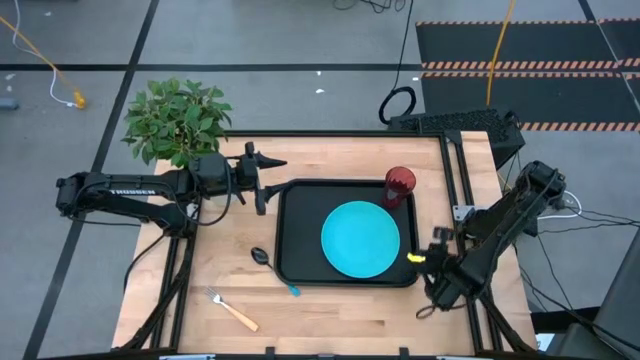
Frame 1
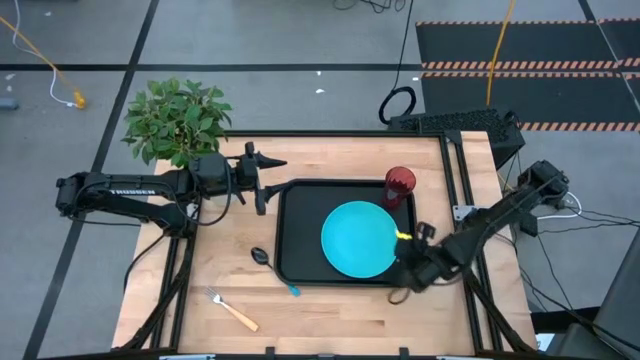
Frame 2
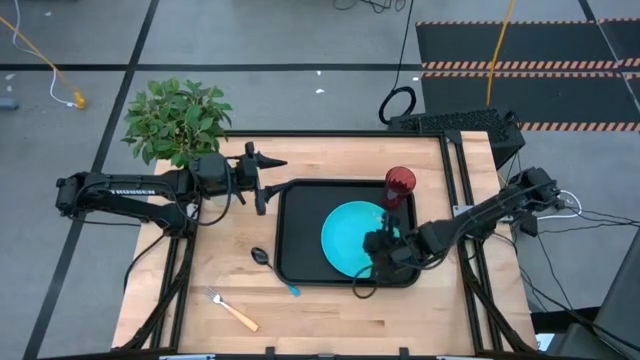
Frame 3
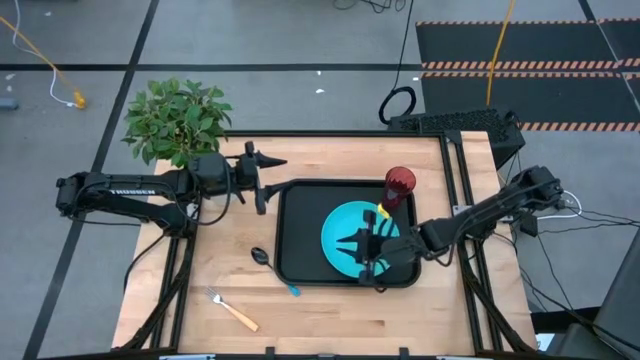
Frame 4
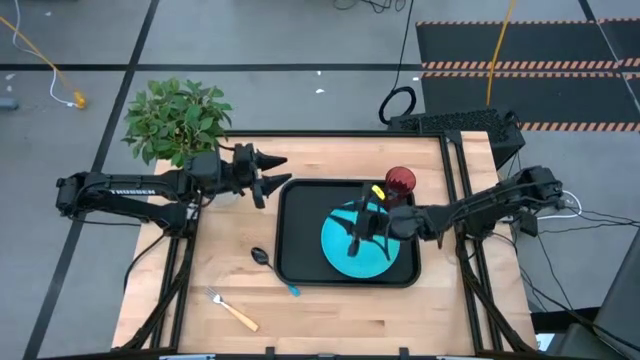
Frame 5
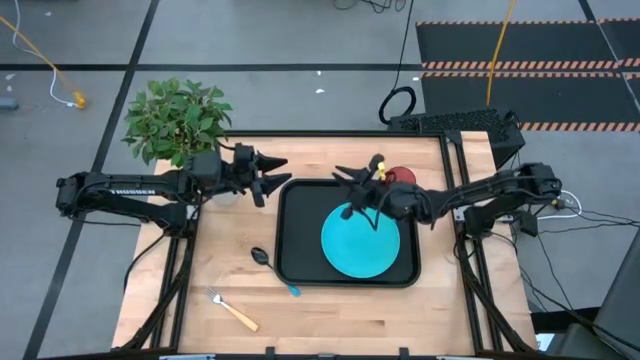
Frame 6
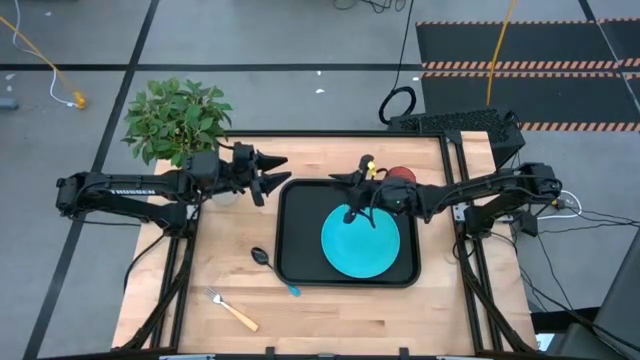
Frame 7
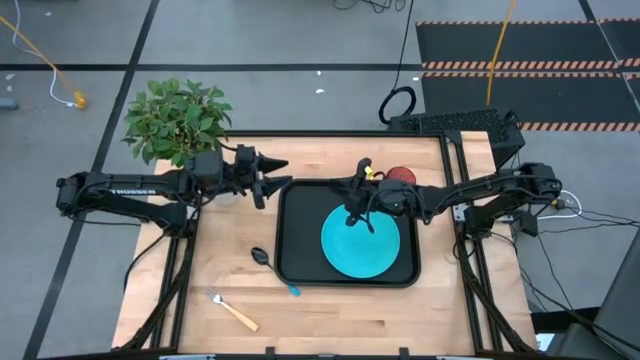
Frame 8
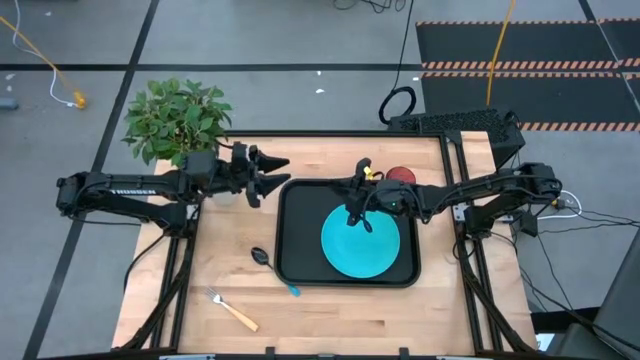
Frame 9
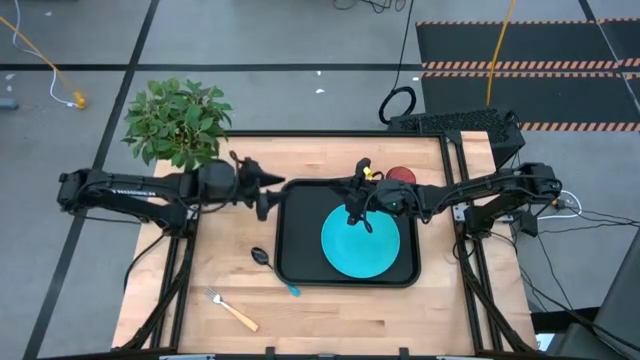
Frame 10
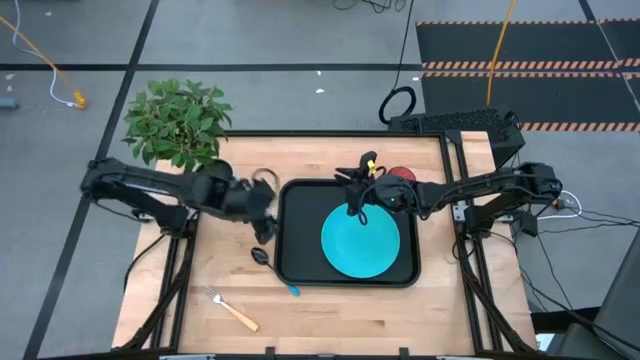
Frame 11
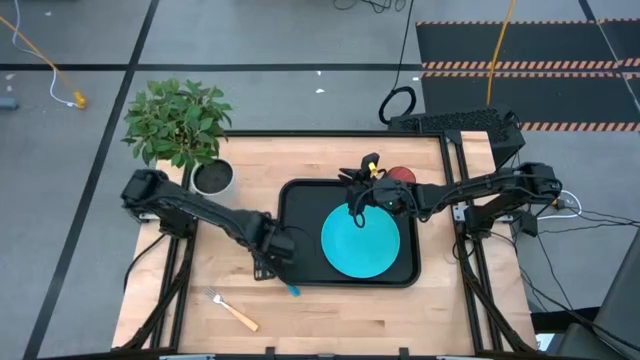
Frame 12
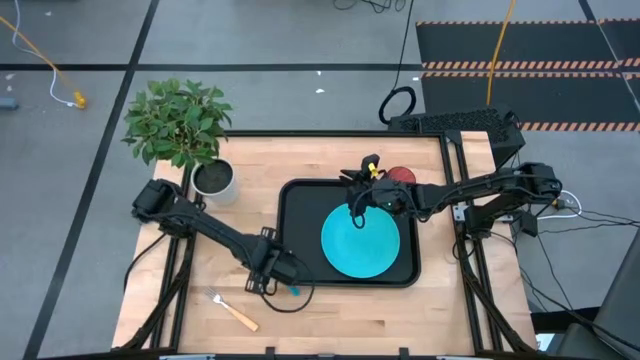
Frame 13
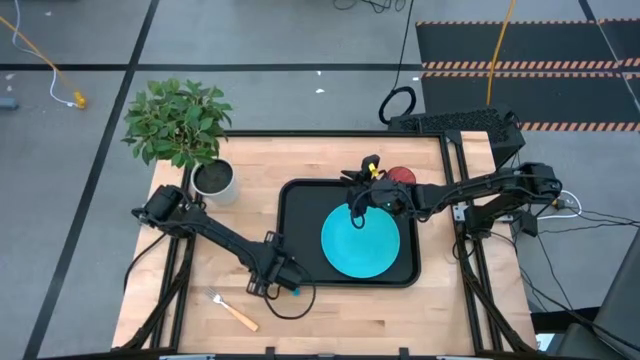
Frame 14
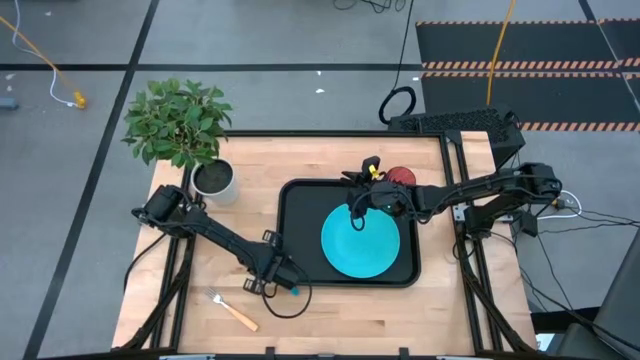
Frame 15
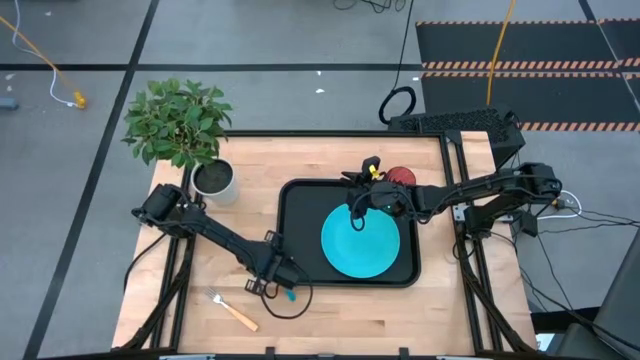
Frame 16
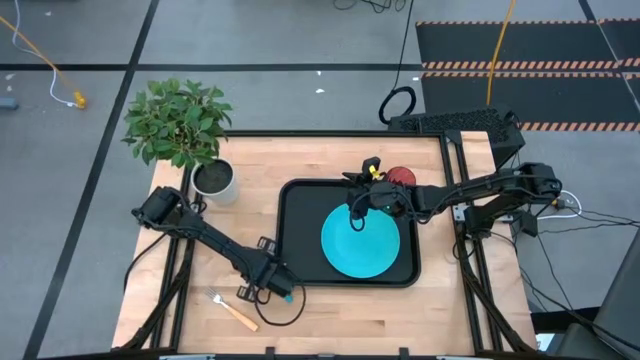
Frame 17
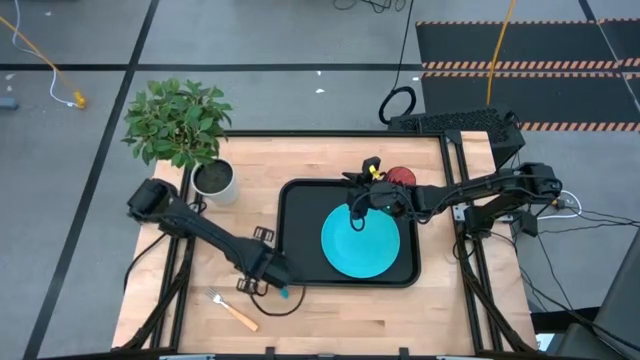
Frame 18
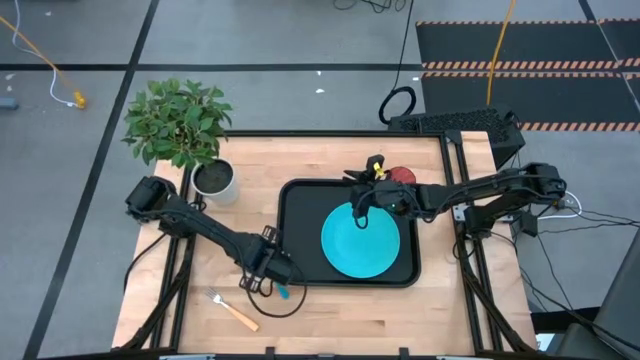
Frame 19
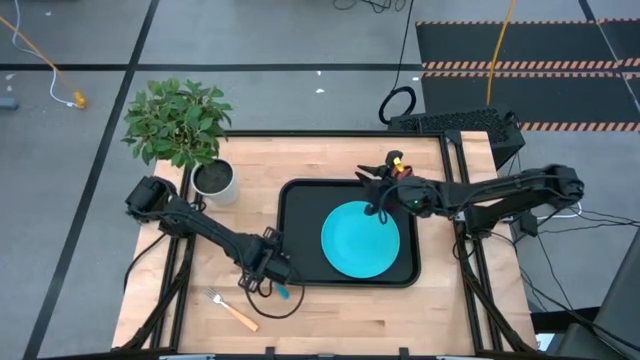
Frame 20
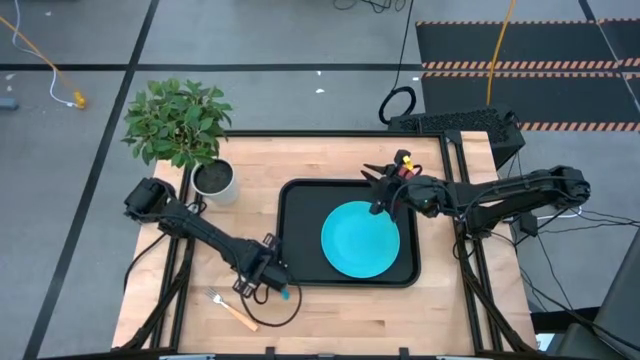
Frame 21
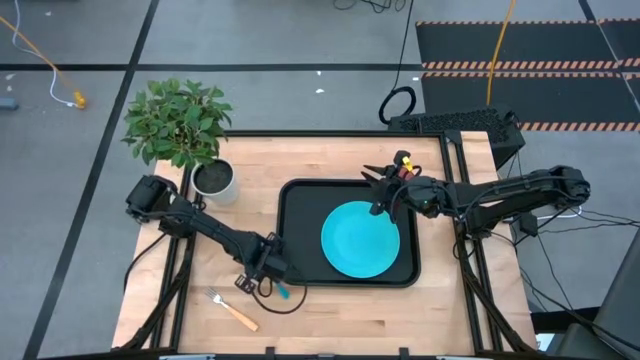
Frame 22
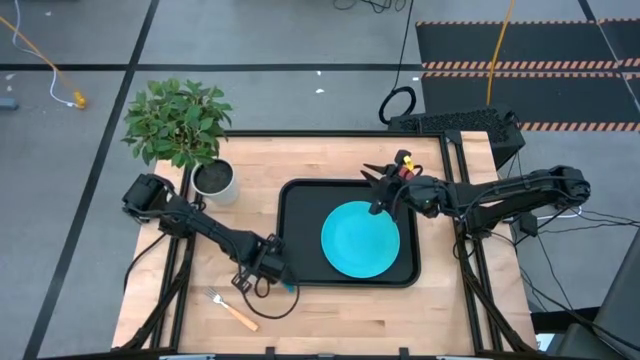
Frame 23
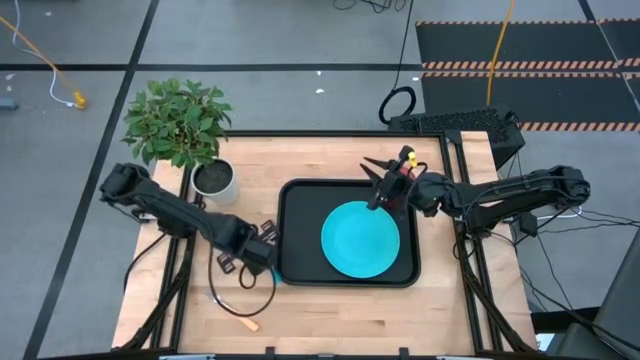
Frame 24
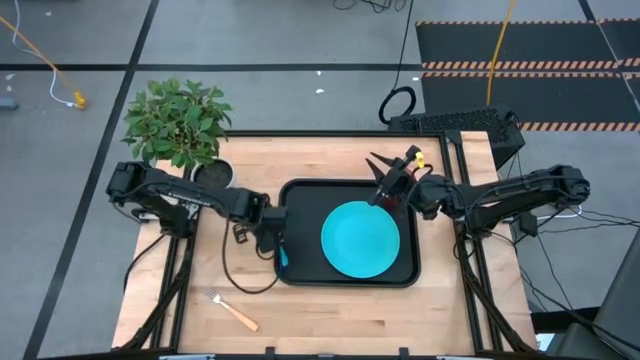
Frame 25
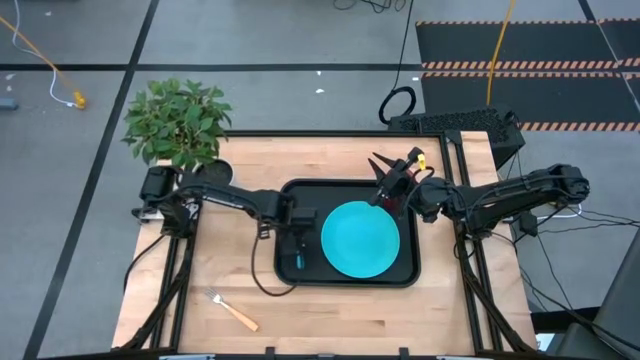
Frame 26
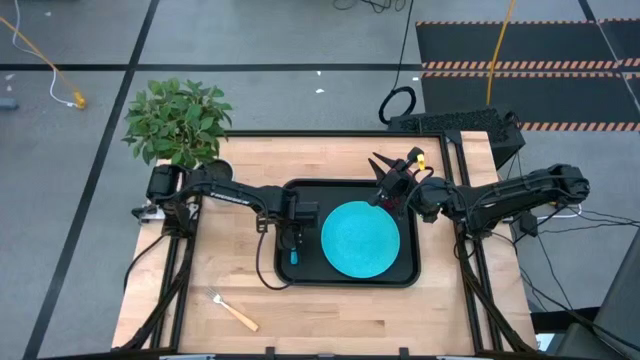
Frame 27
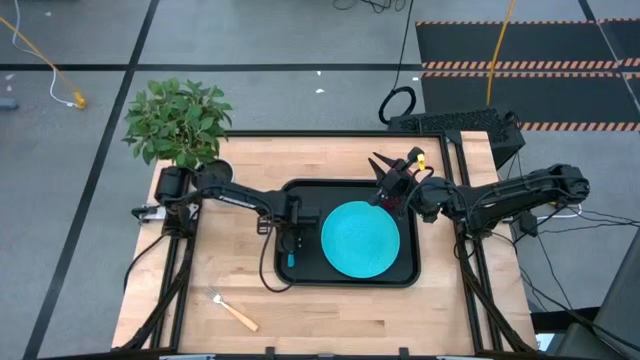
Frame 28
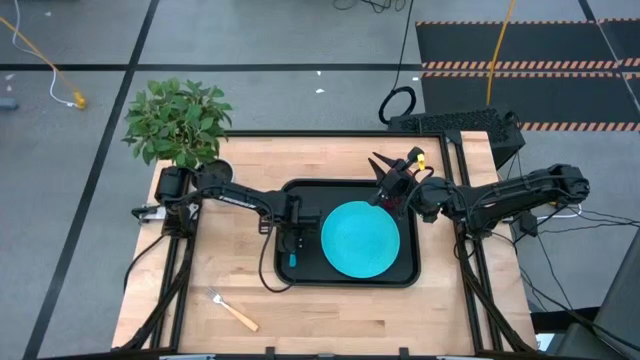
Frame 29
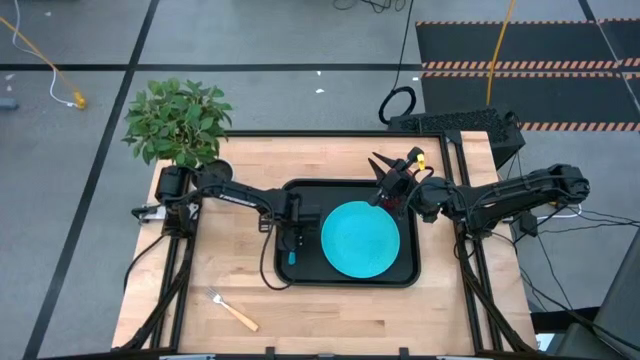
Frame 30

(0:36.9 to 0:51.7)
Task: Pick and place plate/cup/fork/spoon on tray
Put the blue spoon on the black serving tray to the left of the blue plate

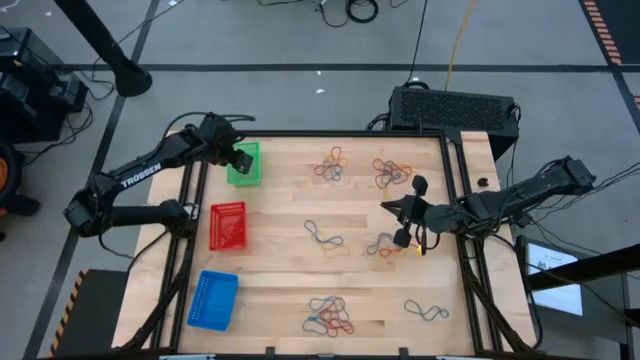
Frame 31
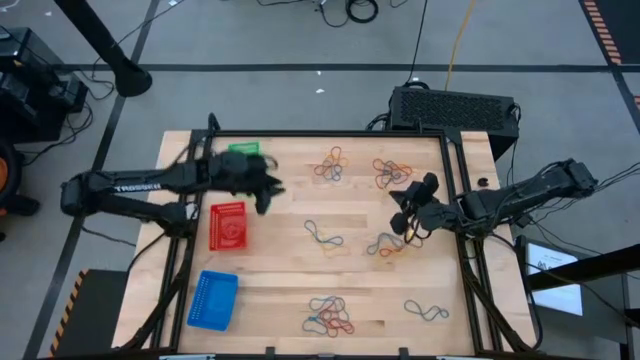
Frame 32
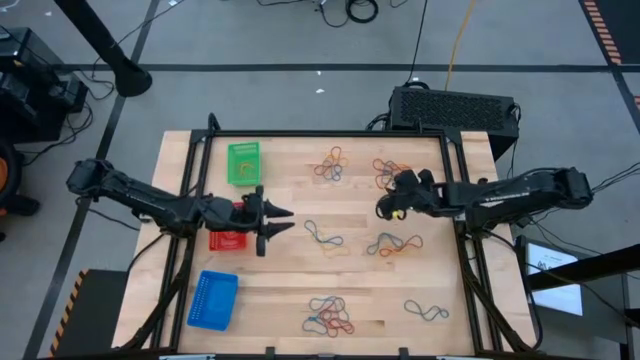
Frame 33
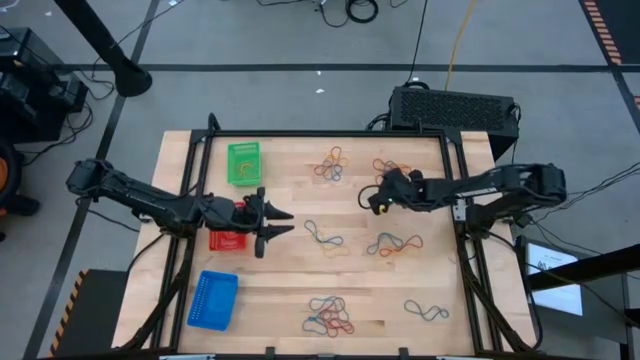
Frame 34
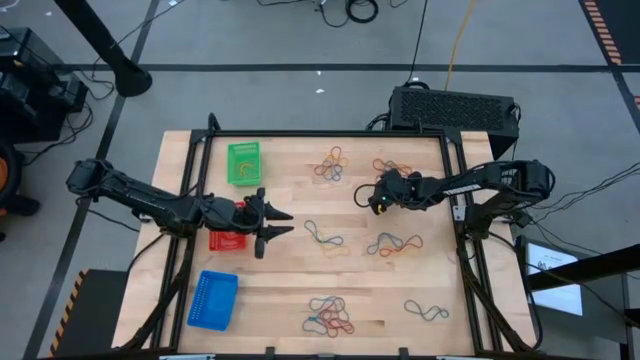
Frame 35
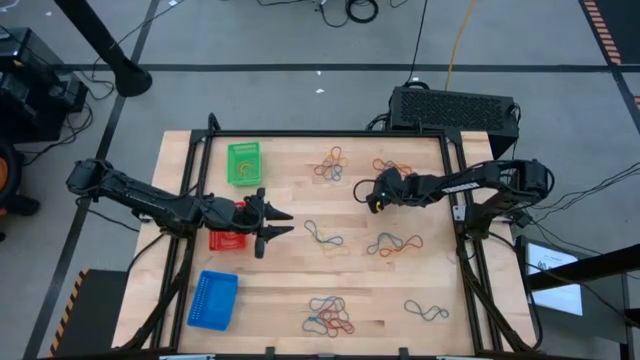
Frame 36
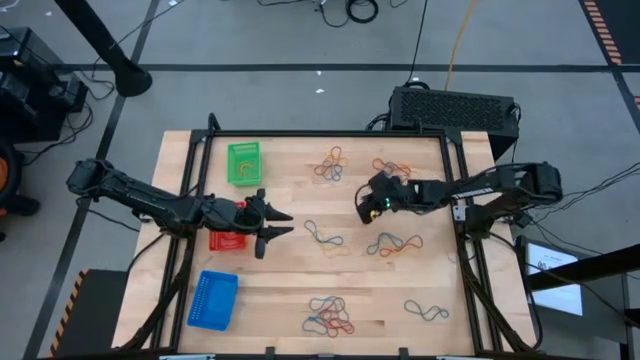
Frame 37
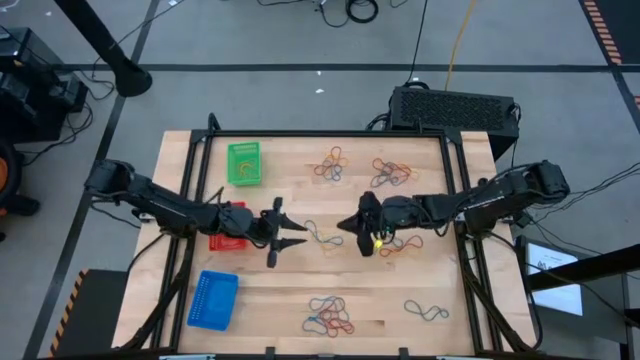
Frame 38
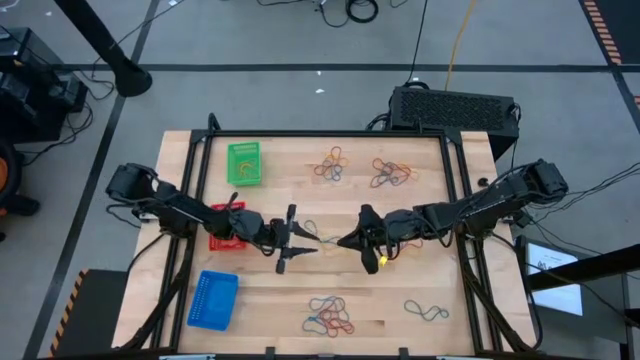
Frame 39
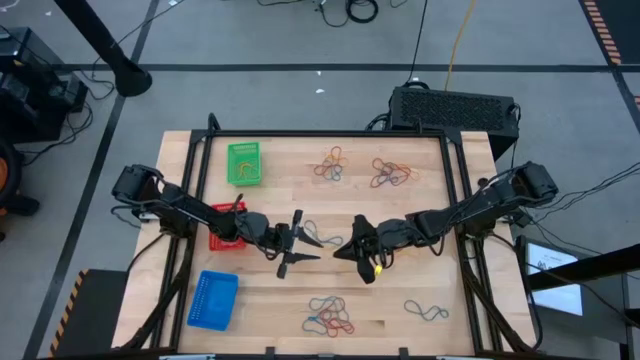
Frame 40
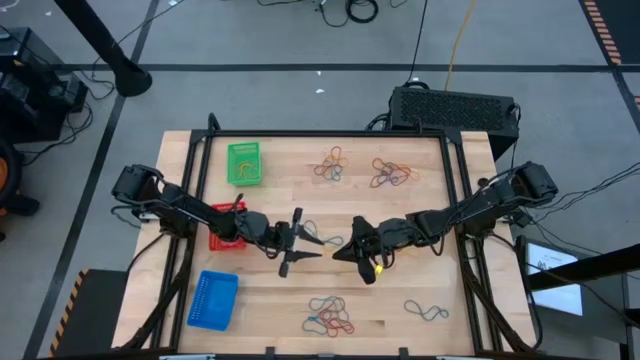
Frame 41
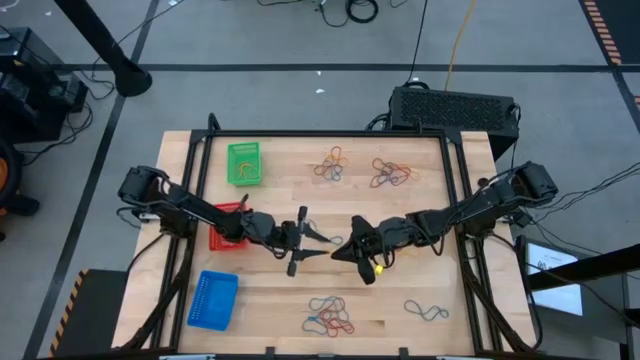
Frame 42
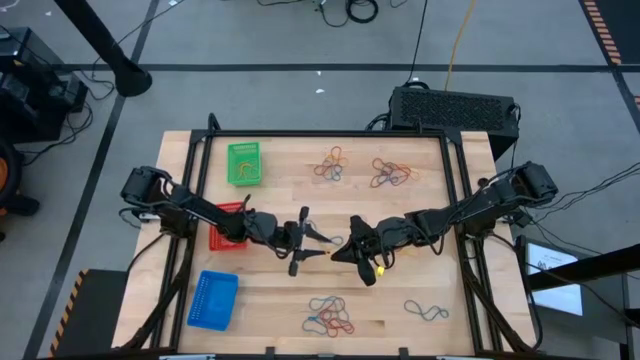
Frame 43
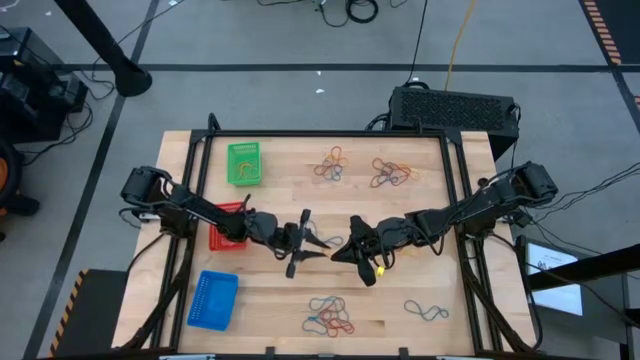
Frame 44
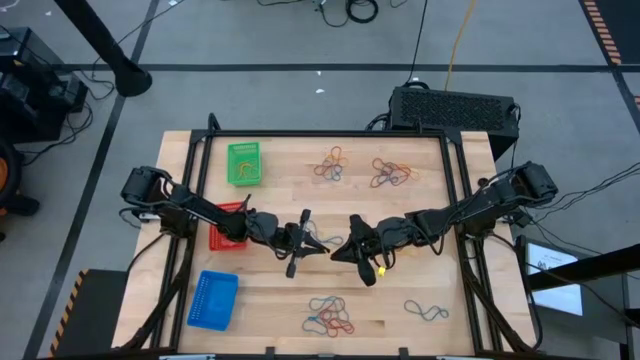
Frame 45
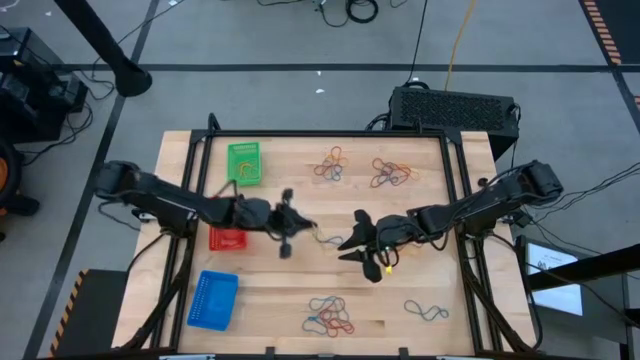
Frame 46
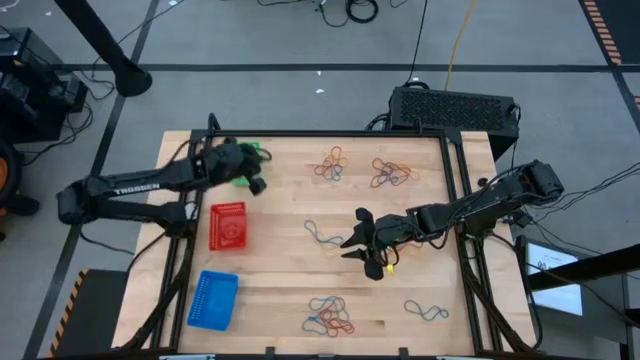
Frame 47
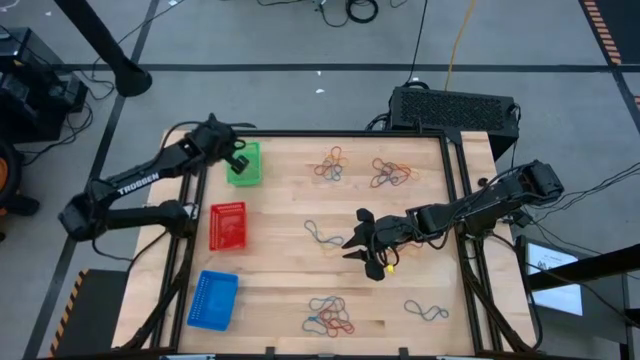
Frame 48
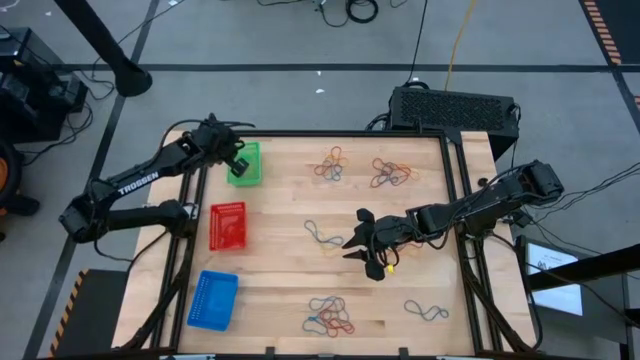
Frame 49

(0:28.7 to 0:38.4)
Task: Sort rubber bands into baskets
Put the yellow rubber band into the green bin
